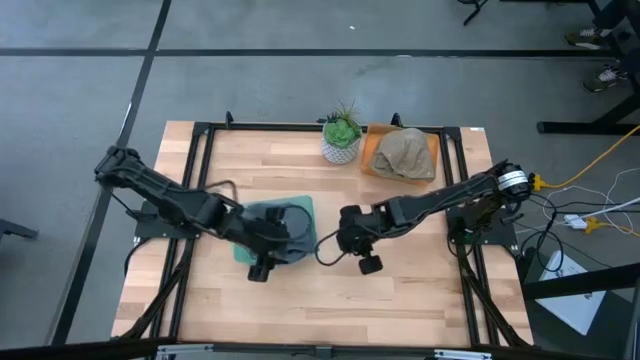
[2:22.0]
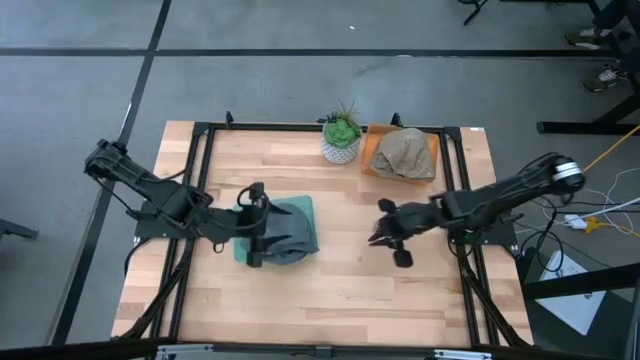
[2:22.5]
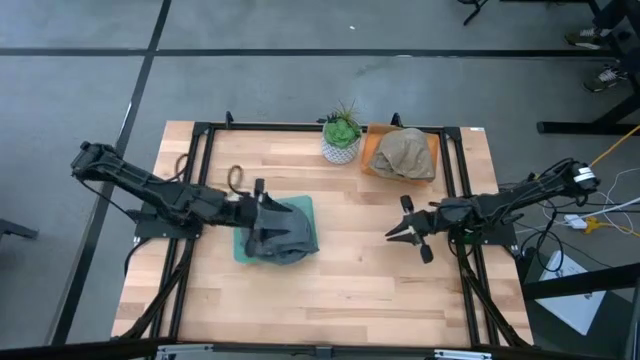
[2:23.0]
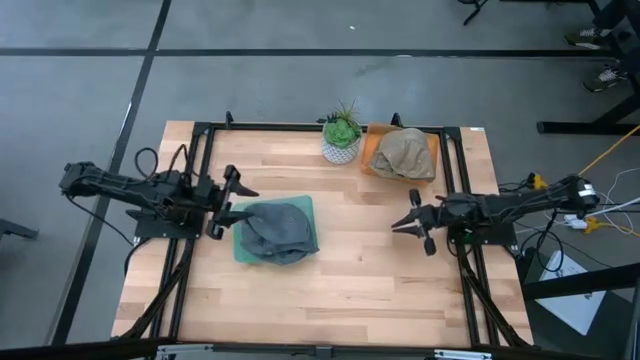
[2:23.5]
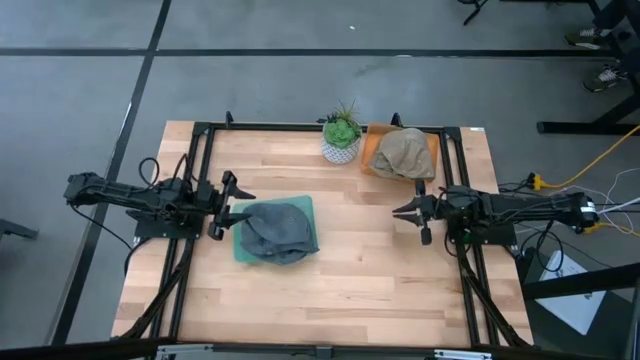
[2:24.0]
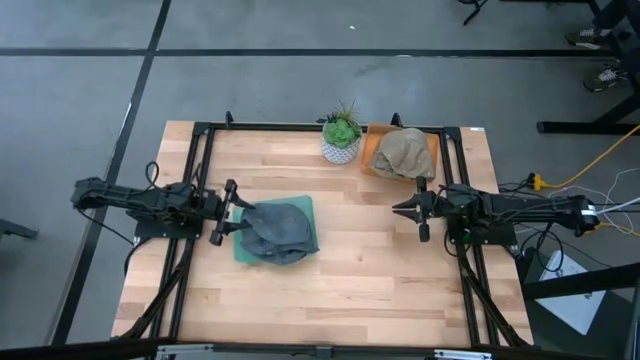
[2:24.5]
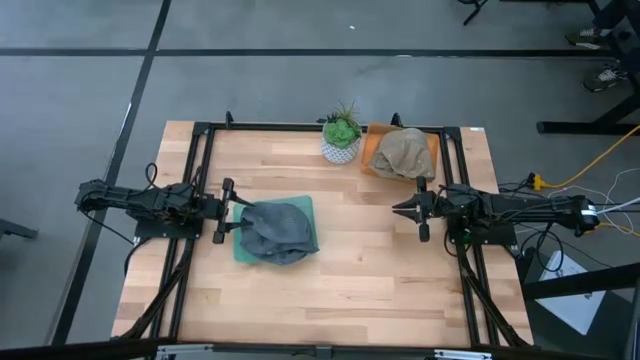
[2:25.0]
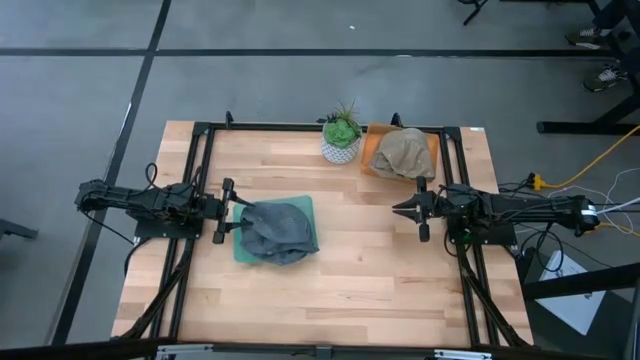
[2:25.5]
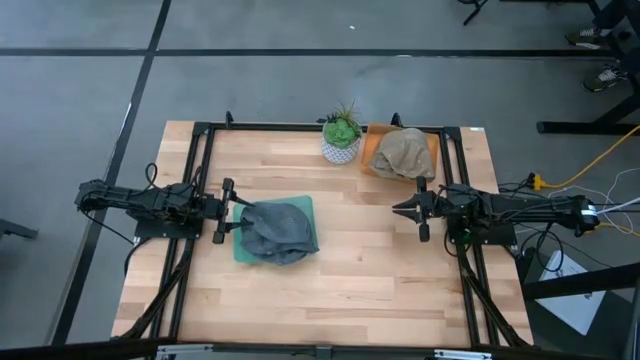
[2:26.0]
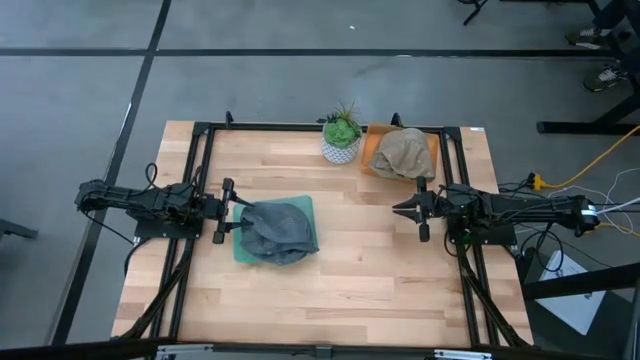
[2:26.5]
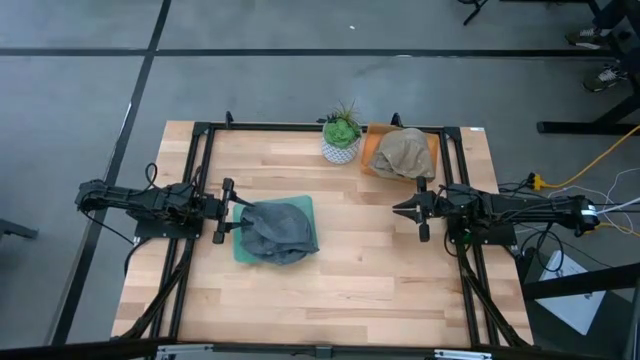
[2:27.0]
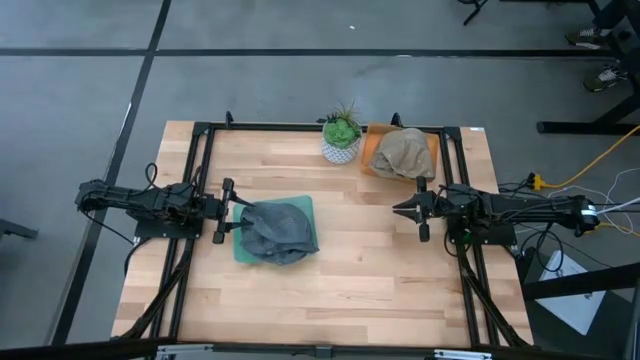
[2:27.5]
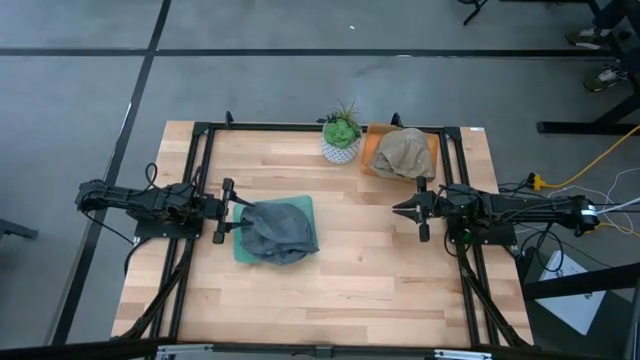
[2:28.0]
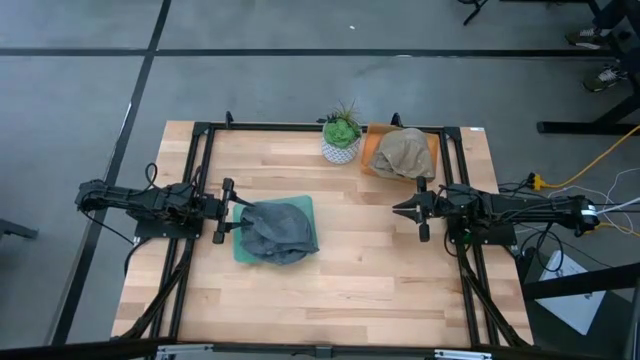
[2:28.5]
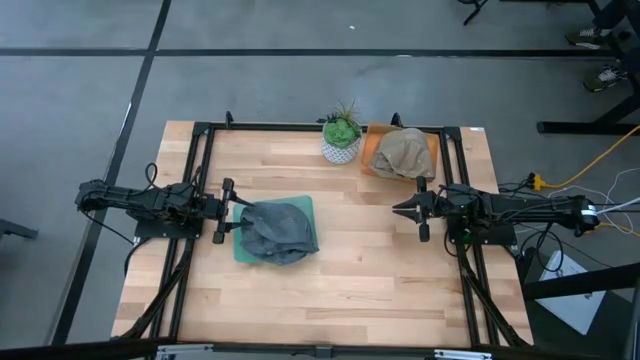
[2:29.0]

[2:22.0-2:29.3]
Task: Pick & Place hat
Return to Home Position

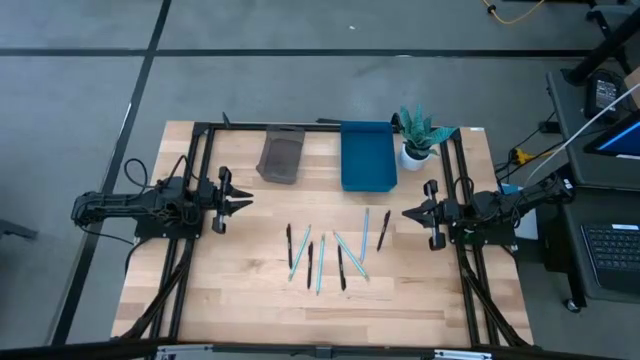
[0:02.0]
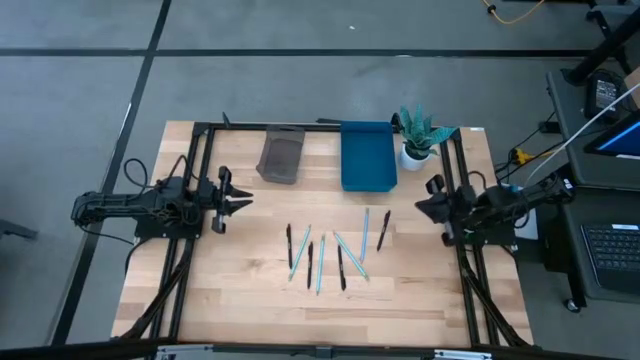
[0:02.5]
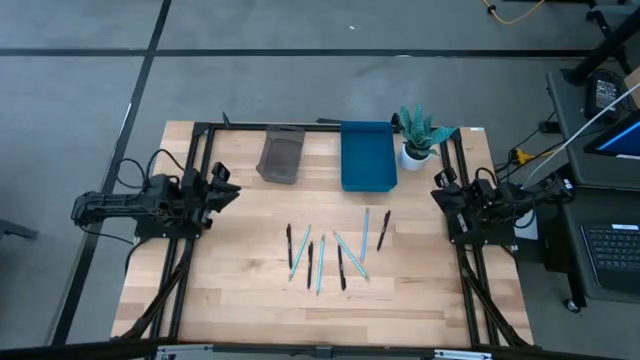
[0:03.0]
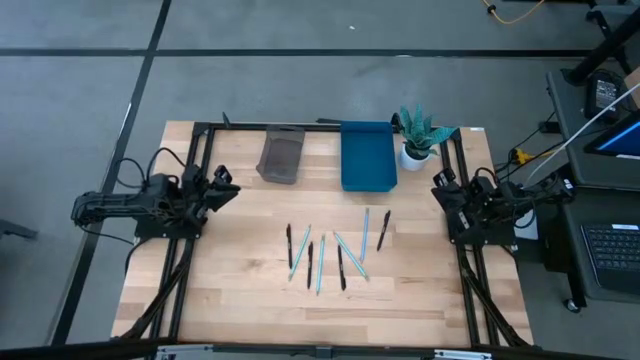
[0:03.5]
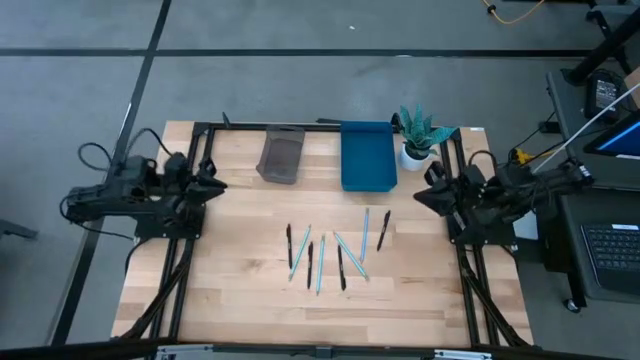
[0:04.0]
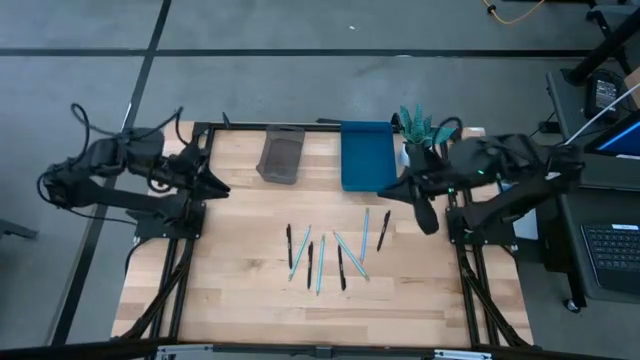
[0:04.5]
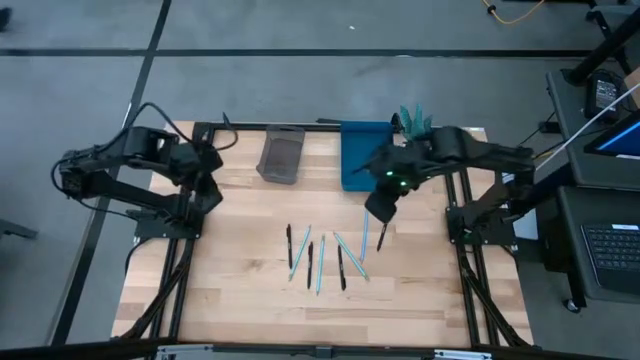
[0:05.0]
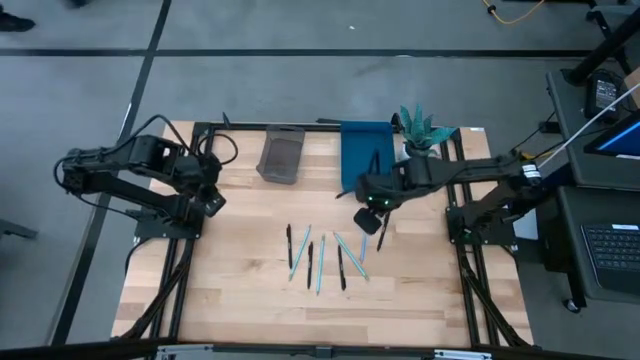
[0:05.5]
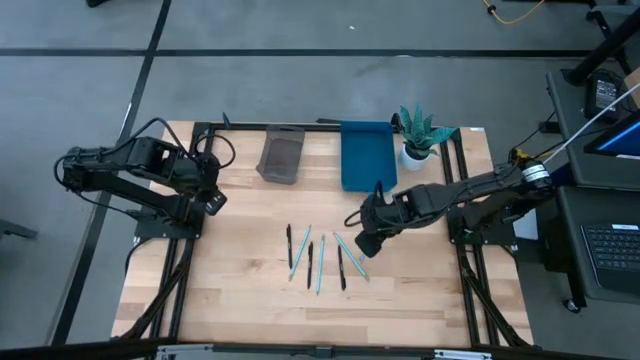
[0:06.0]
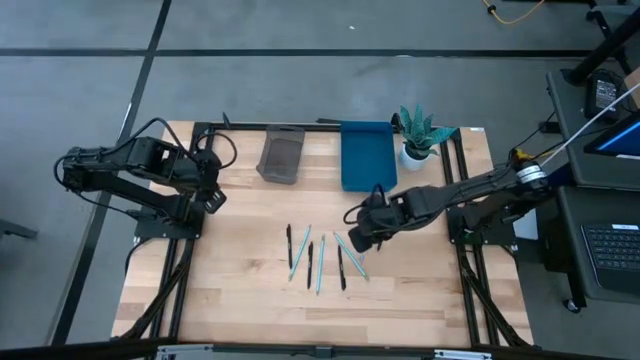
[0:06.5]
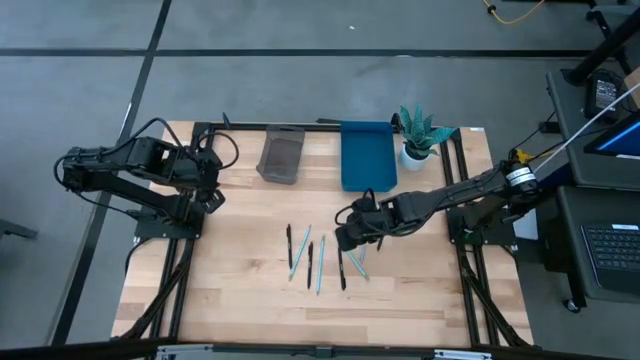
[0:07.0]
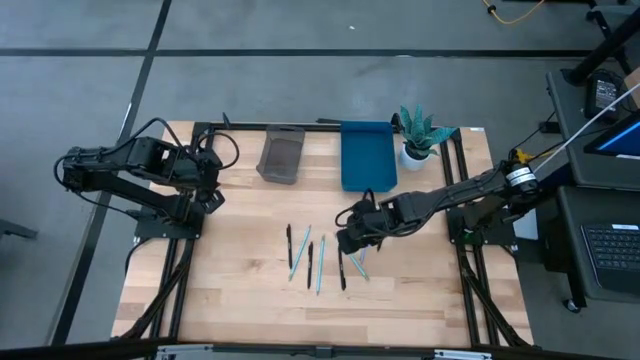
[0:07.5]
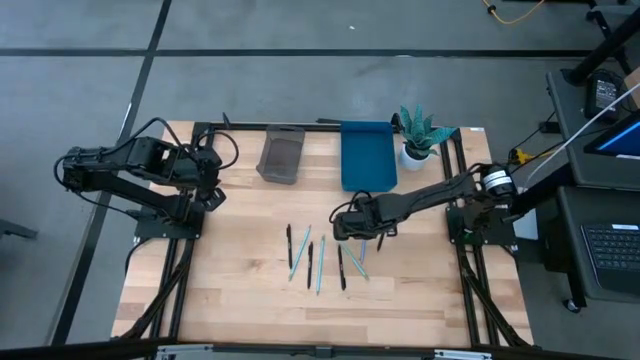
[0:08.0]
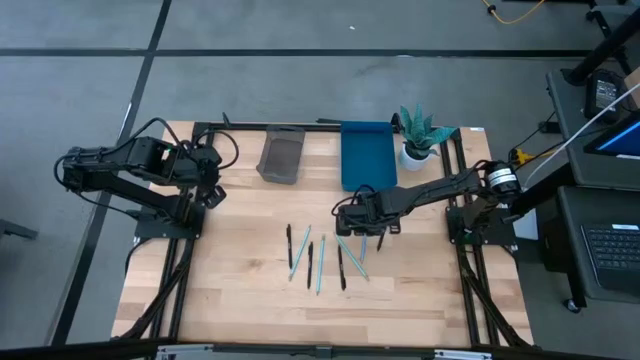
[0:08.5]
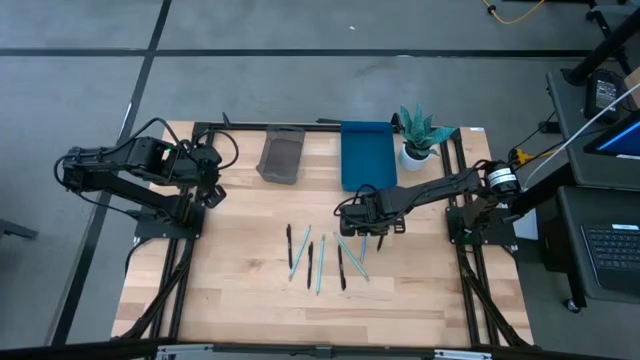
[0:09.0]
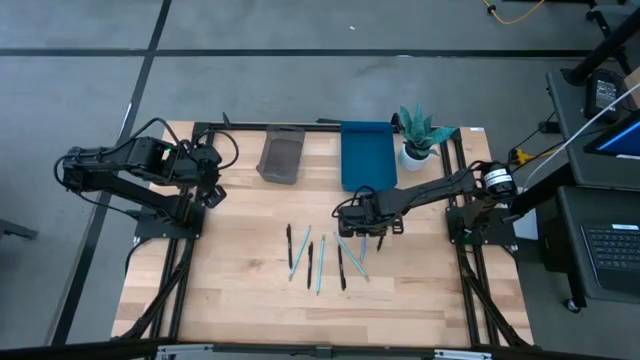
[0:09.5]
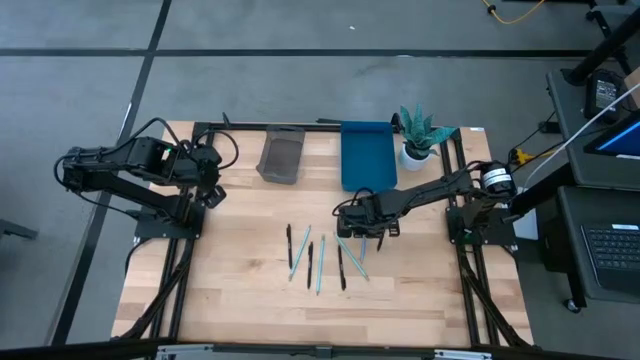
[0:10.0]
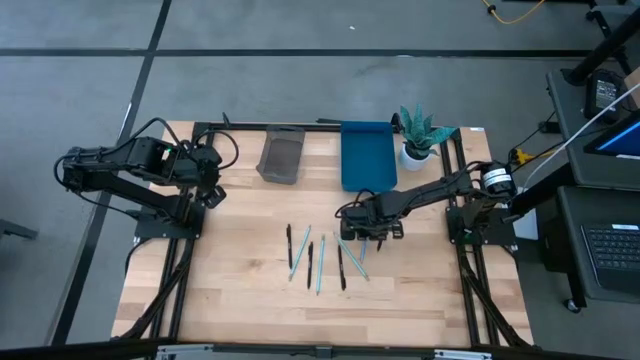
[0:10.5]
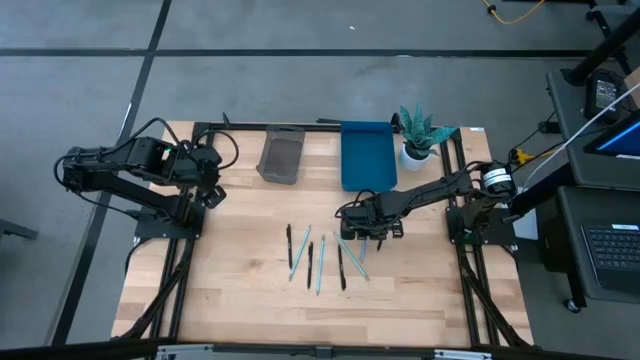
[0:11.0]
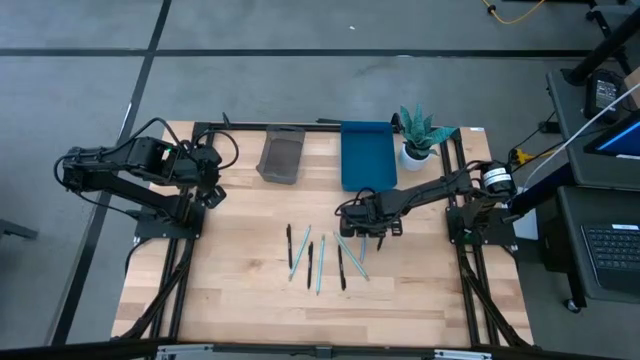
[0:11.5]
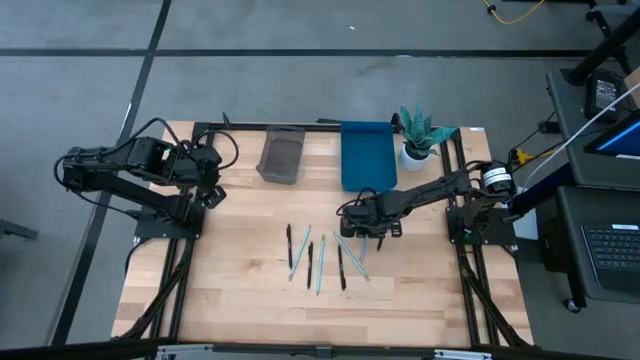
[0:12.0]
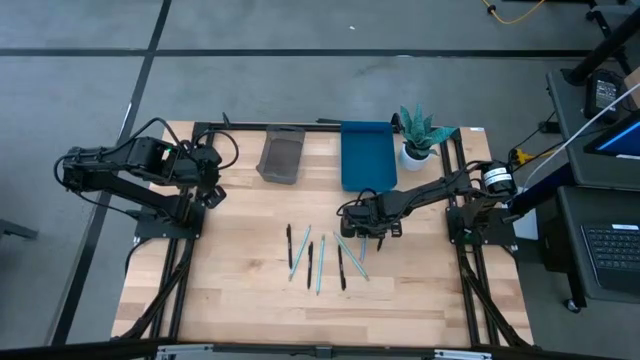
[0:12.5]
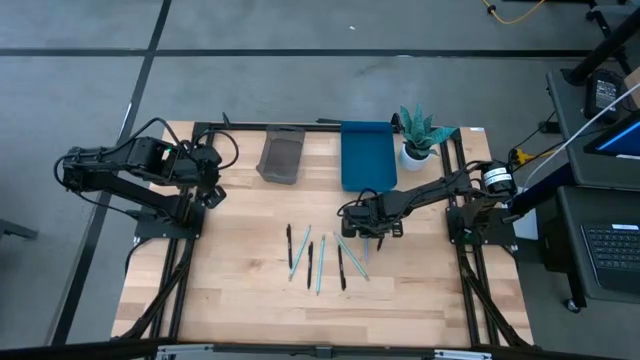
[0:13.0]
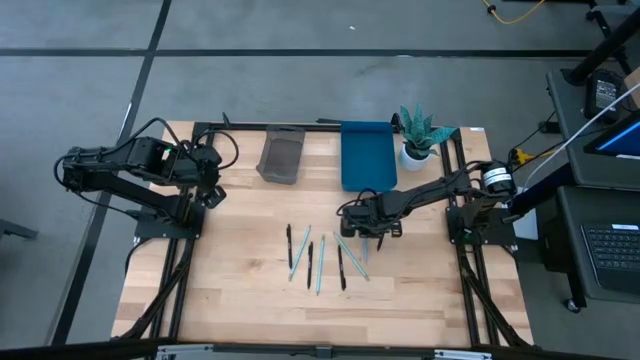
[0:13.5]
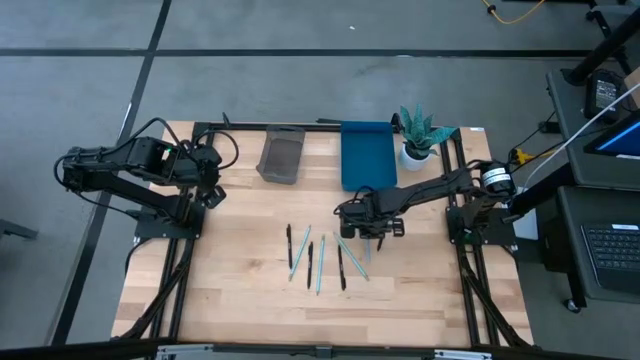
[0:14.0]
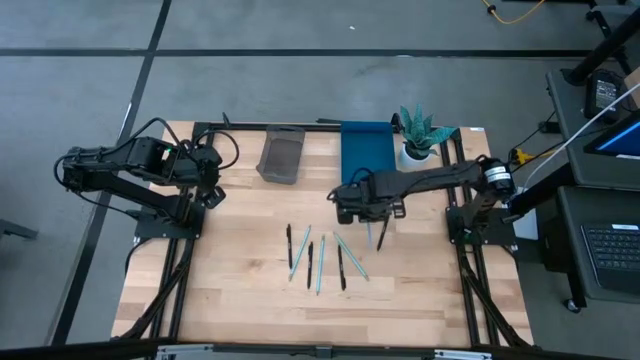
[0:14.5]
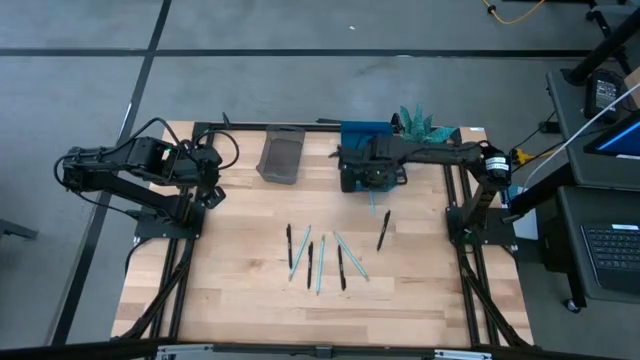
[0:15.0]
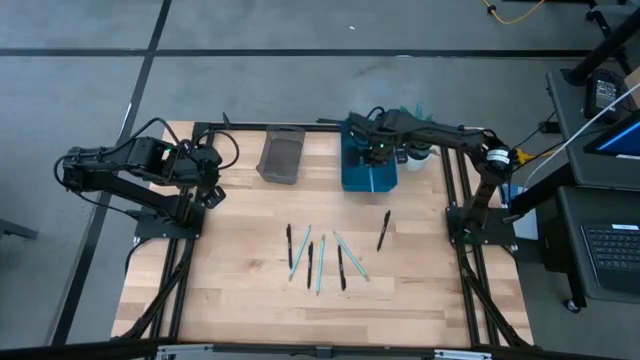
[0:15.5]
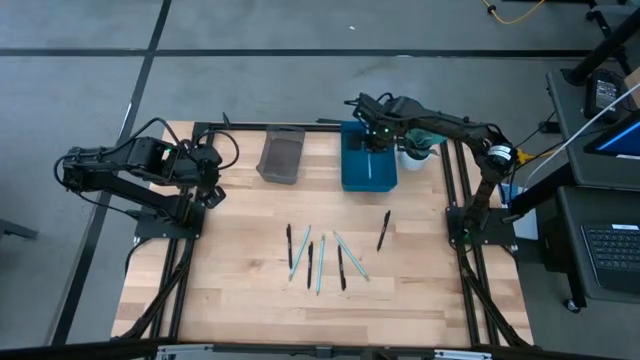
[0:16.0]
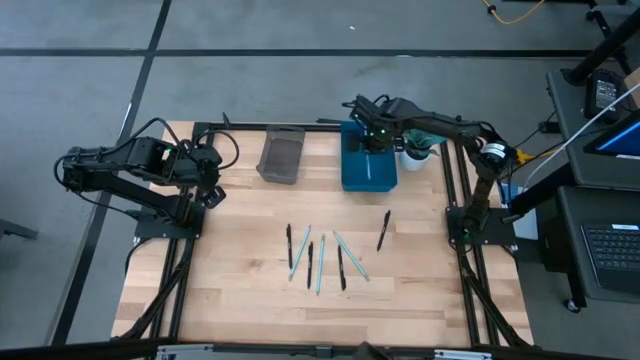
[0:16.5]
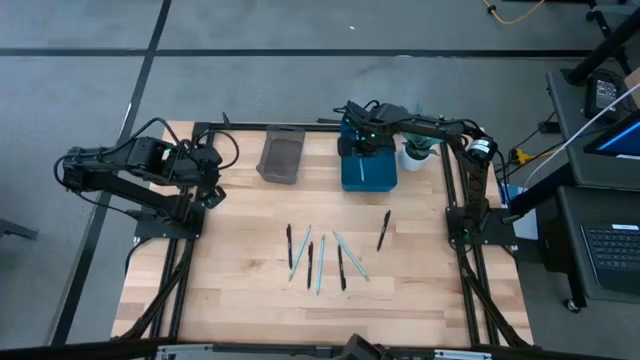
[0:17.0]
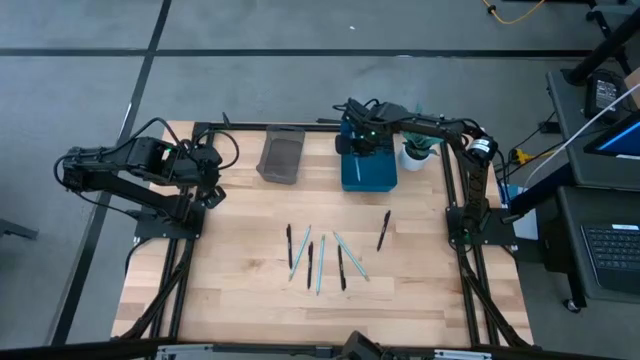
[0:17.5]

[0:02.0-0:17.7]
Task: Sort pens & pencils
Put the right light blue pencil into the blue bin
